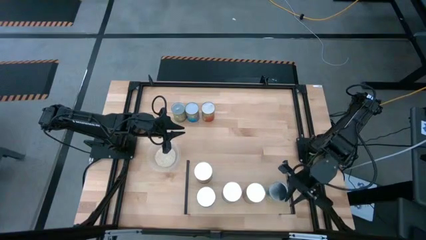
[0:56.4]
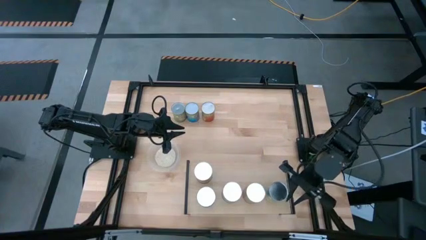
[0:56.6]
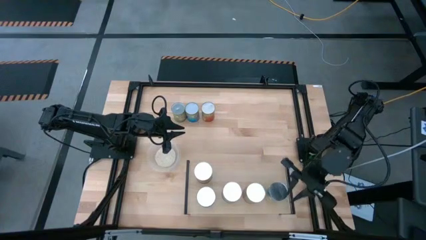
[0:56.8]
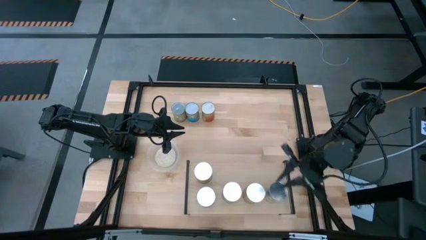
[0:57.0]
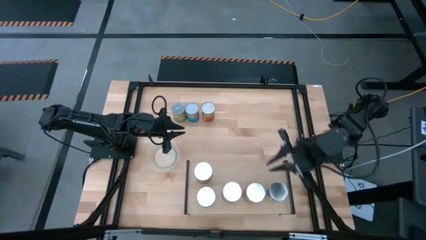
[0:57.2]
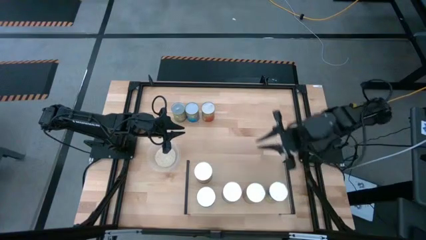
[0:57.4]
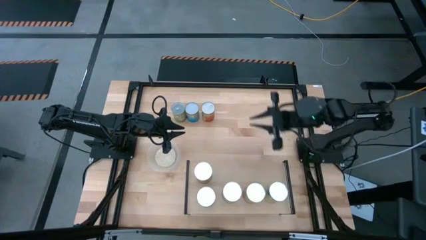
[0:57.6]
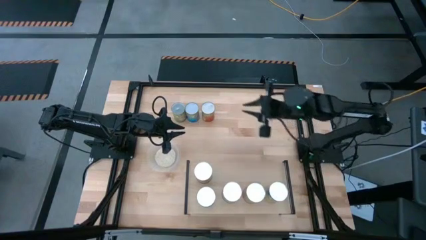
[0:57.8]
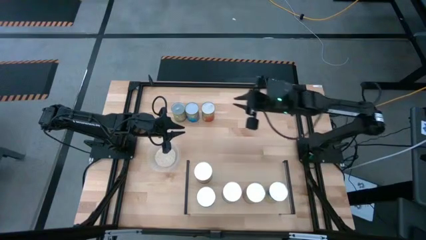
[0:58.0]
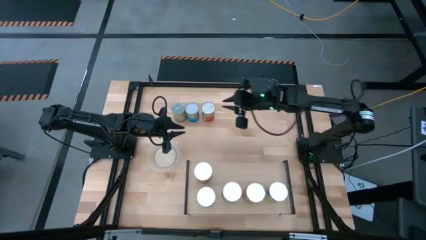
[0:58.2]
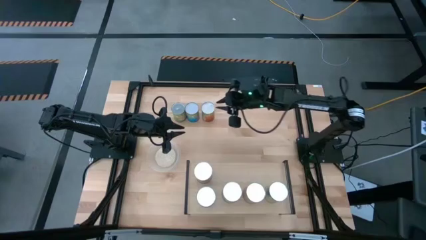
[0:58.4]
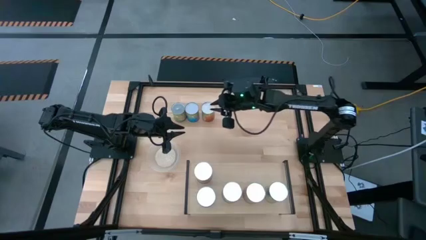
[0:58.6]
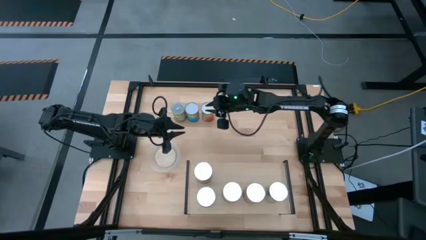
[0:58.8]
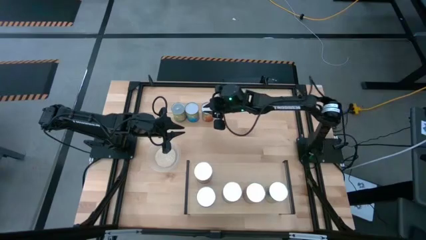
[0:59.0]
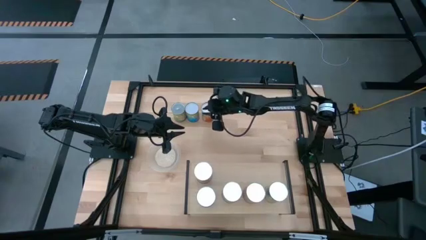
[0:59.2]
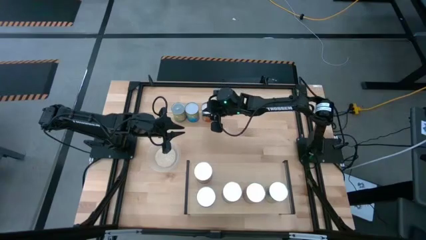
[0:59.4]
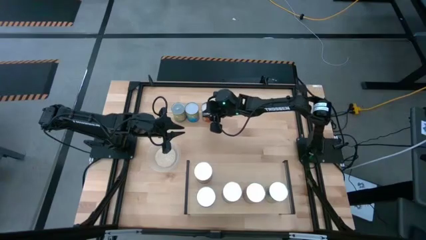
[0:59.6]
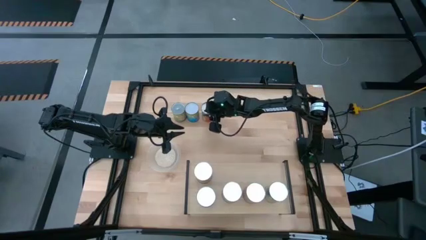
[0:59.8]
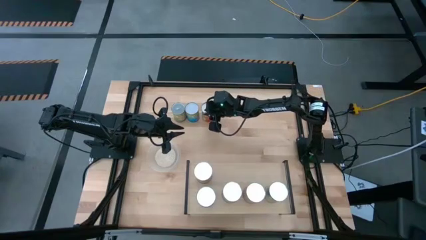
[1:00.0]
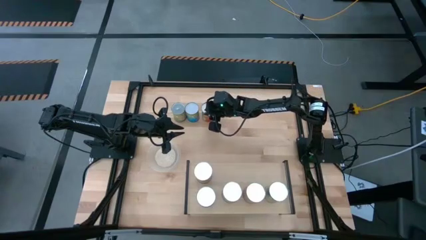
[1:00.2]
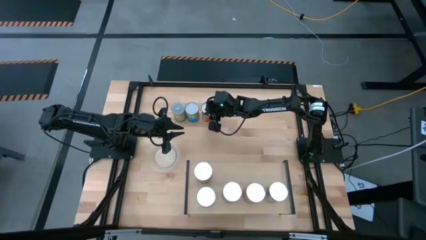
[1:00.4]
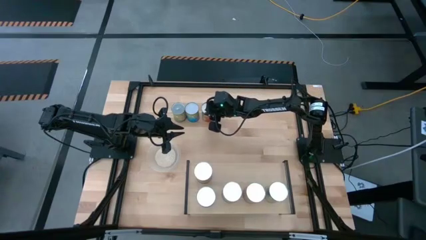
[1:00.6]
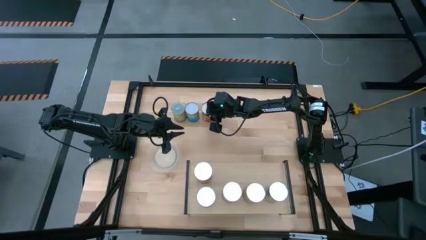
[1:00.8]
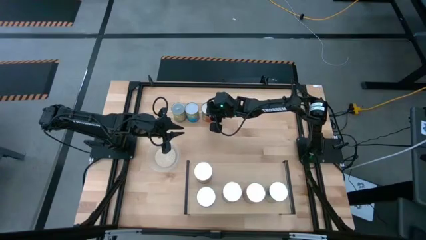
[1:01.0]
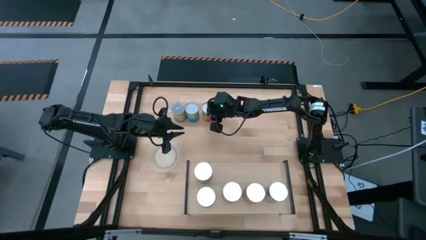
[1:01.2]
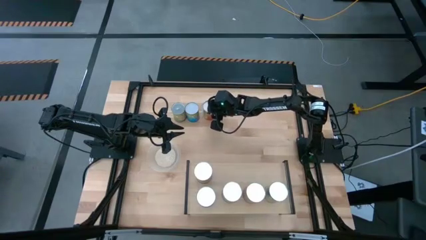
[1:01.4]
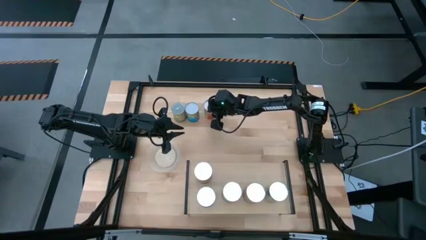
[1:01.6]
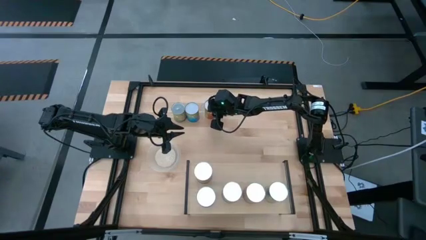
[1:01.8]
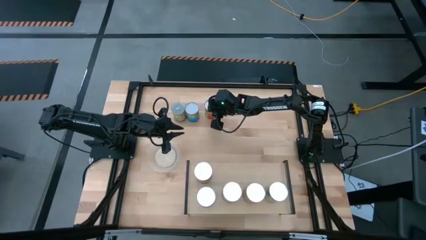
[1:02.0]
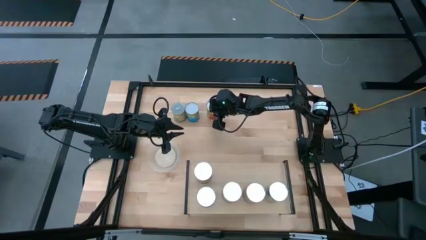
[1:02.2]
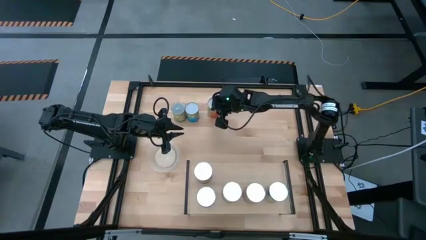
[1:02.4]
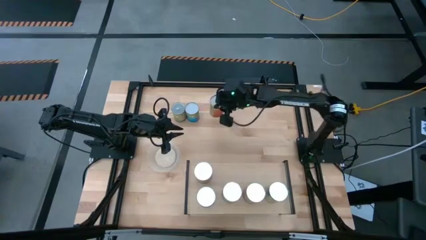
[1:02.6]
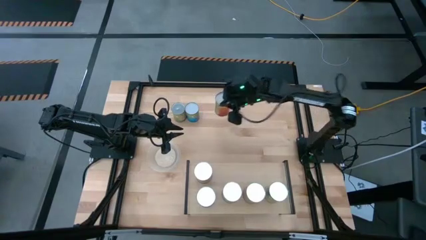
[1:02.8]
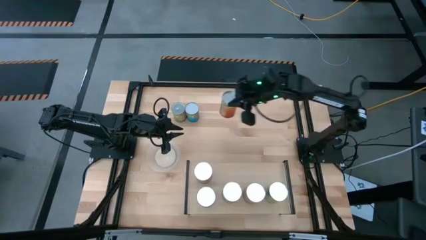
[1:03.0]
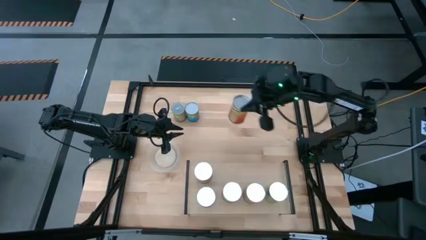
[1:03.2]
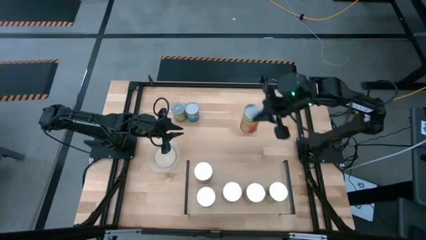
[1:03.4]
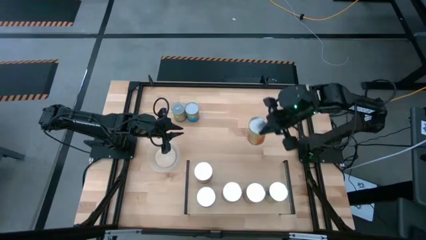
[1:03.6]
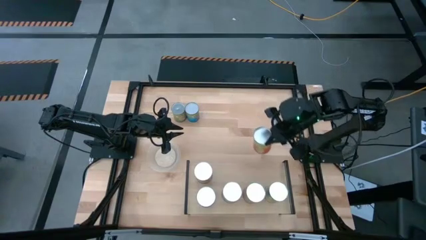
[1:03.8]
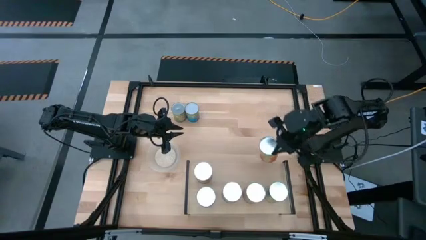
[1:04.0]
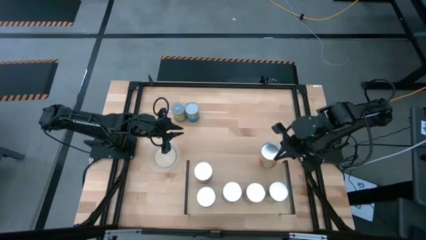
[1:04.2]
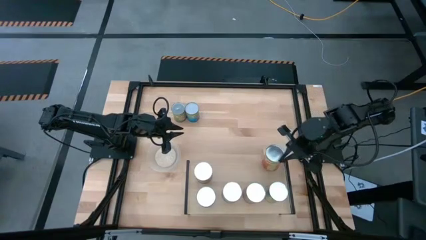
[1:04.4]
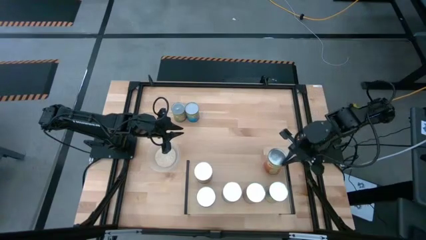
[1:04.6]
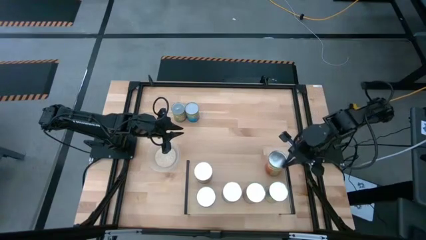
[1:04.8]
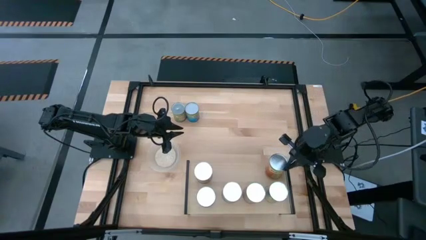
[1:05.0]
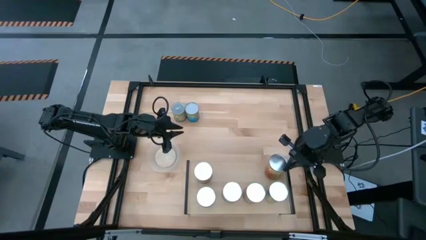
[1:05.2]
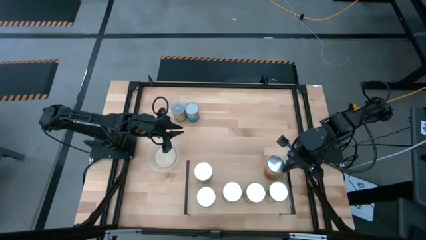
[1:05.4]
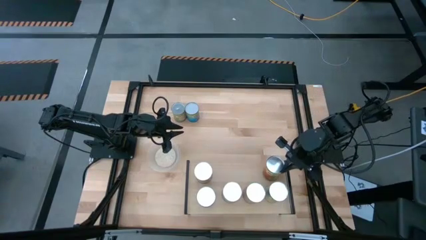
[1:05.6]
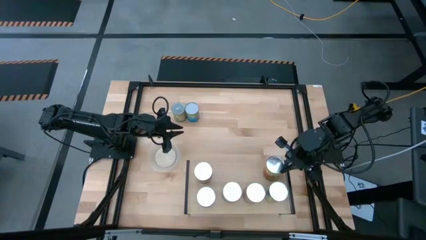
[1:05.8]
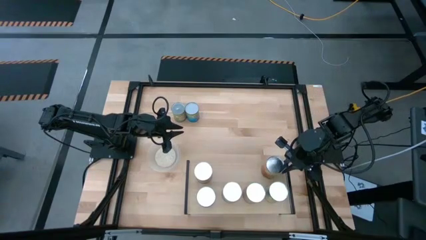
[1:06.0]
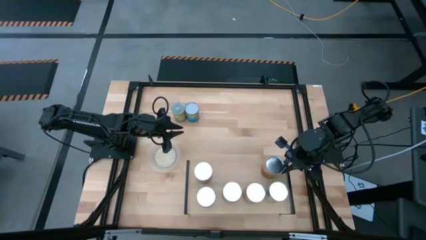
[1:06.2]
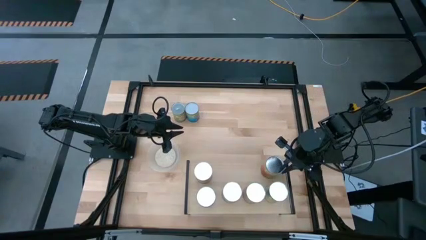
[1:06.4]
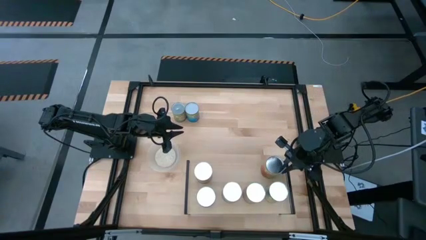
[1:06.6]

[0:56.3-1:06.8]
Task: Pick and place cans onto a shelf
Put the canned pineapple on the shelf

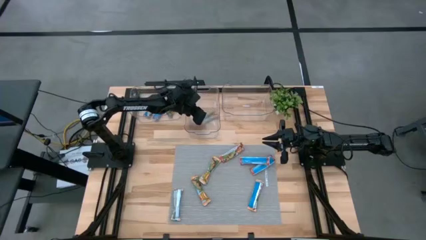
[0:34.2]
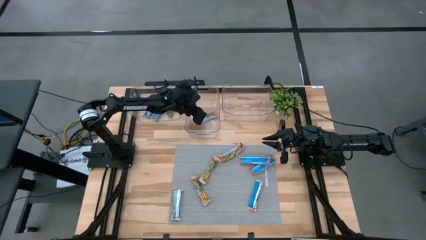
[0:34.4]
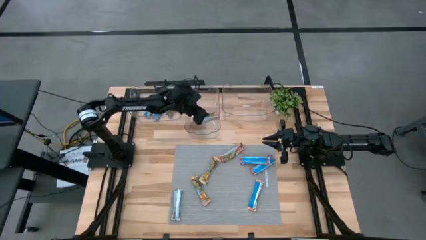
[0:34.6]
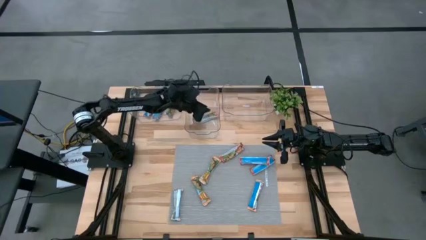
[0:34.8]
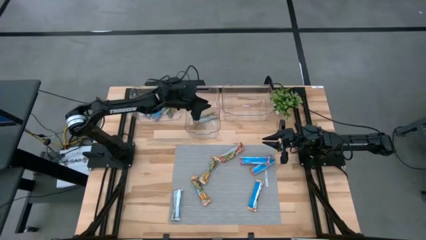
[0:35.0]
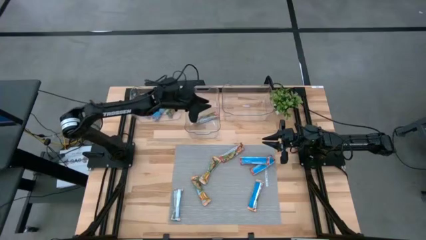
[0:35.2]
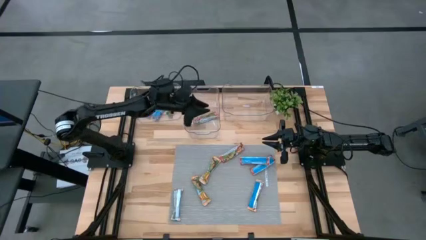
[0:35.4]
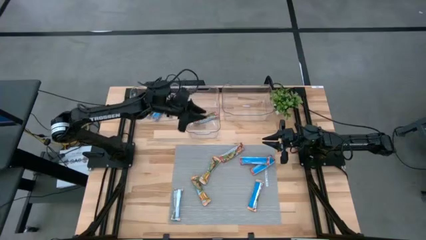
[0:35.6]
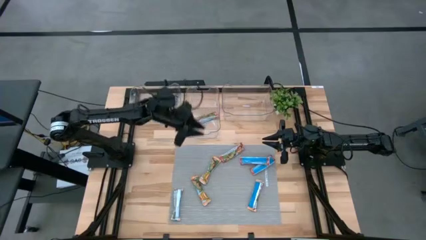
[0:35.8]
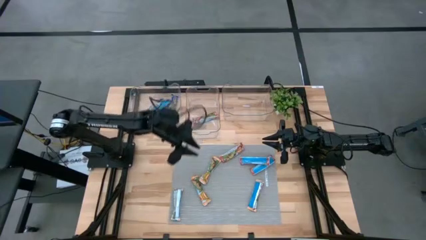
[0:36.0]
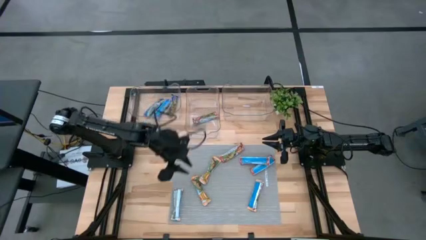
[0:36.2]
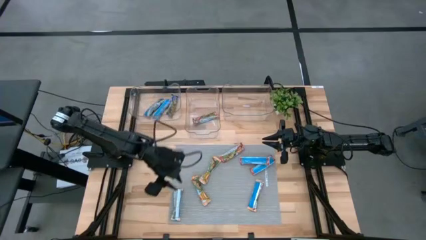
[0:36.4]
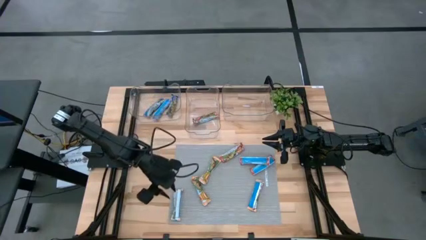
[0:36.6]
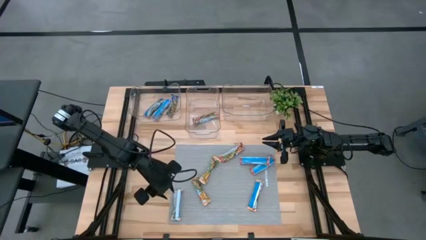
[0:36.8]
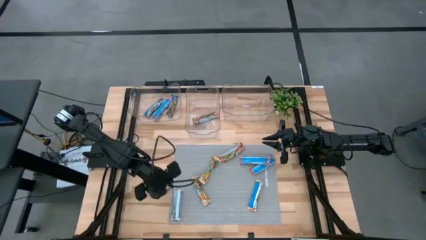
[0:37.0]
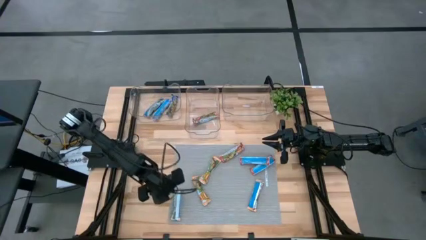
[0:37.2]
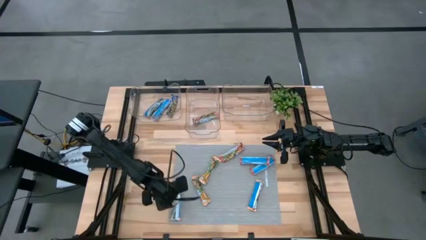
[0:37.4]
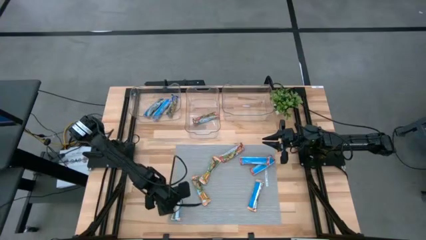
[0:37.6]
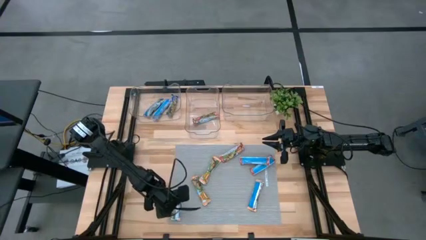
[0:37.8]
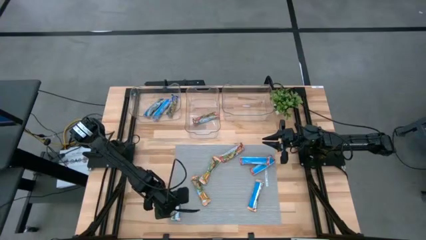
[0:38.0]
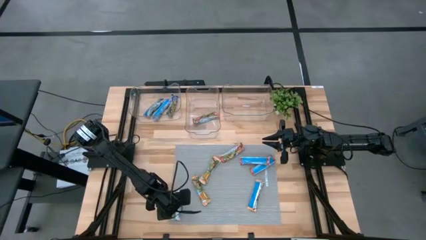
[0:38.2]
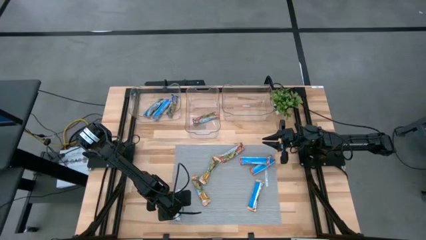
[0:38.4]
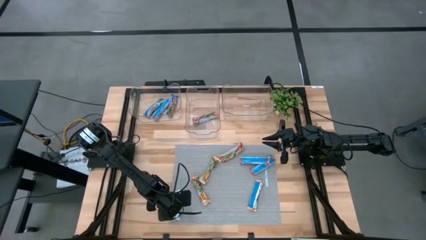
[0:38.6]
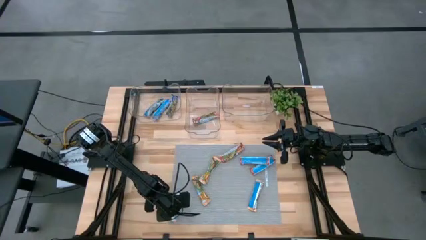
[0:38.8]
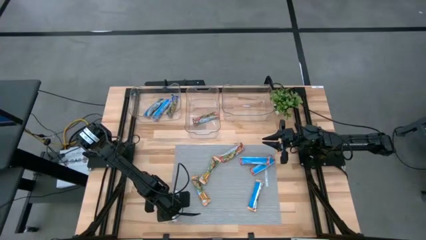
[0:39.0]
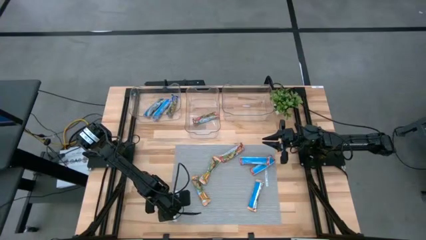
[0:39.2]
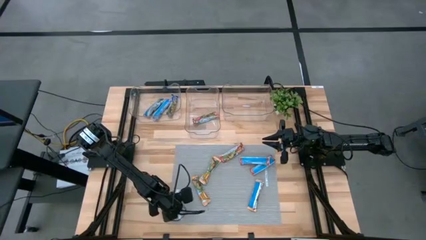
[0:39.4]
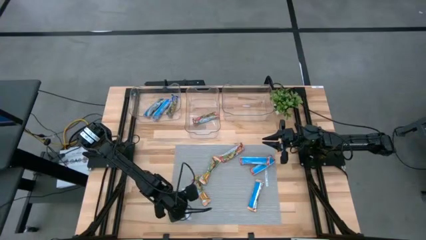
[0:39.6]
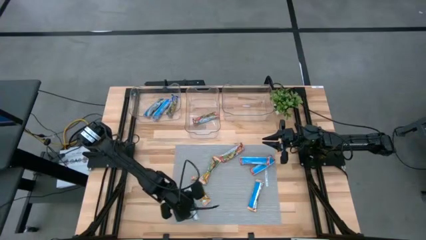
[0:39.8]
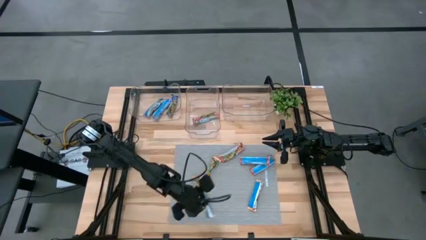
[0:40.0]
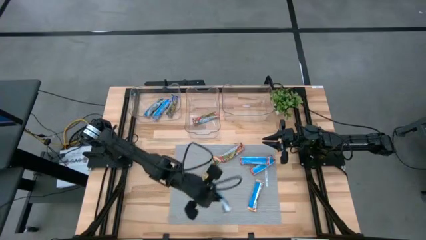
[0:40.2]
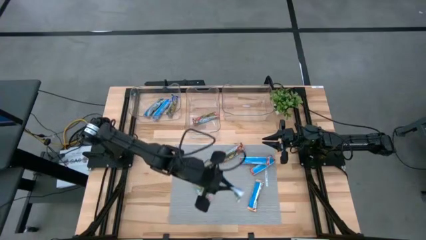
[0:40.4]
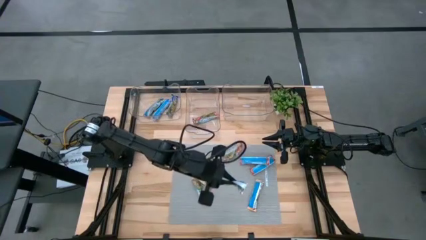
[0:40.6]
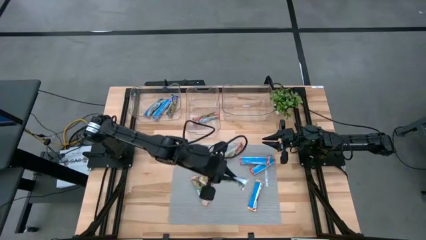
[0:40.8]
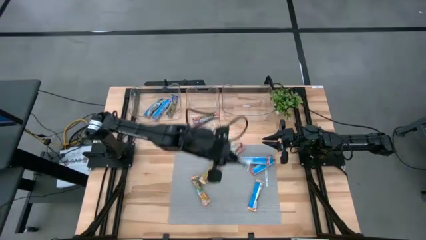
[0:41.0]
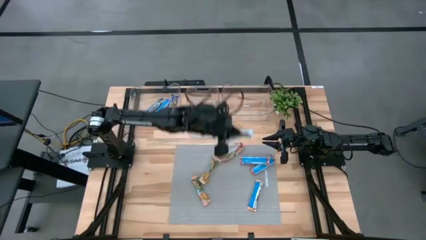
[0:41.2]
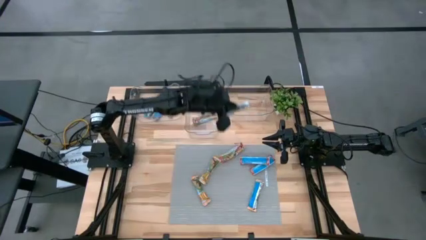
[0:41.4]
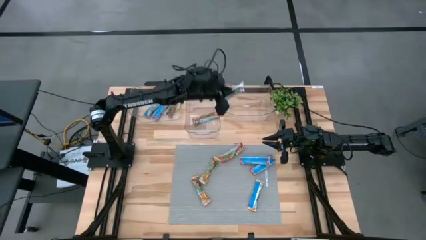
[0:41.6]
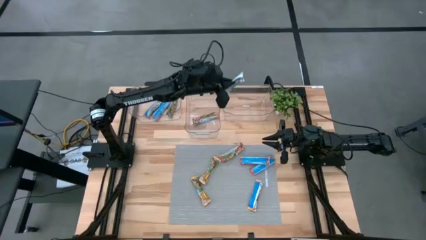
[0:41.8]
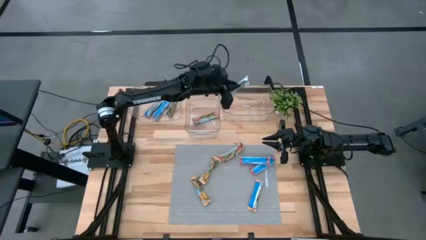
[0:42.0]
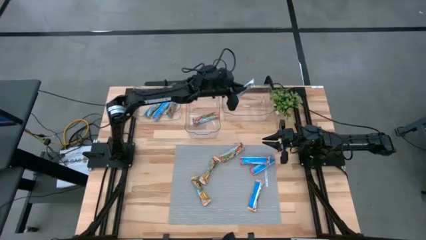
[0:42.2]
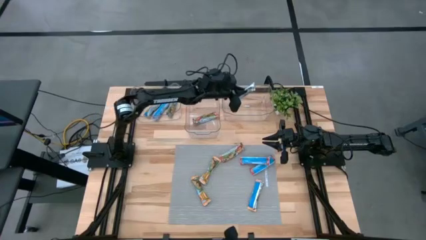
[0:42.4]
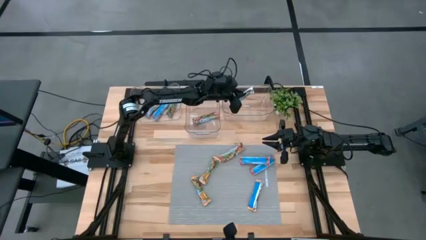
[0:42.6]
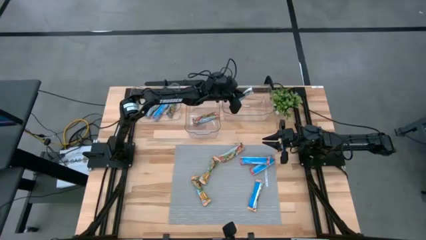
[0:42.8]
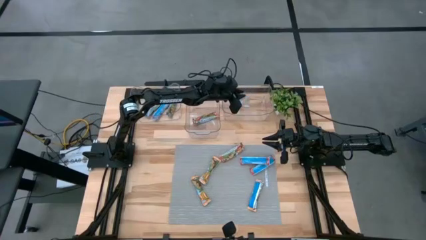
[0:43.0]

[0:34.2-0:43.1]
Task: Pick and place Granola Bars by type
Put the yellow granola bar into the right transparent bin
